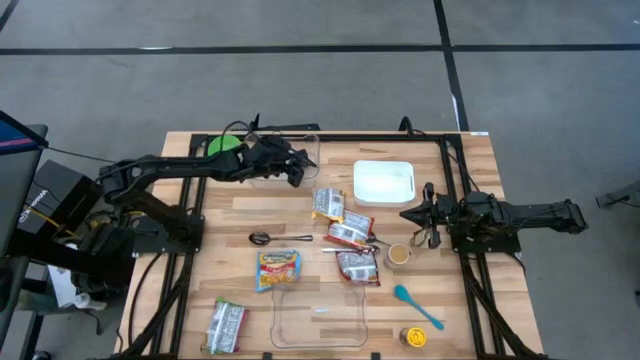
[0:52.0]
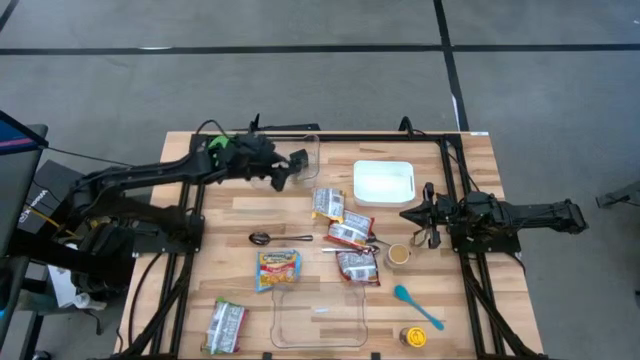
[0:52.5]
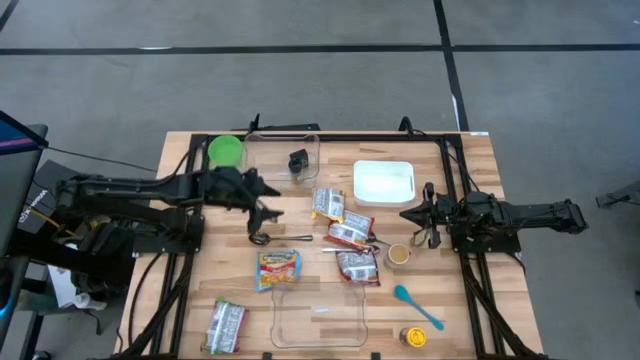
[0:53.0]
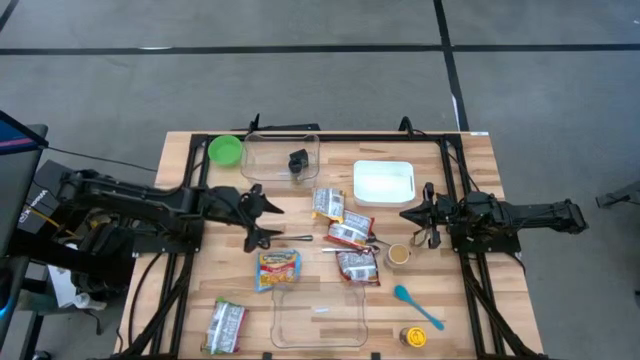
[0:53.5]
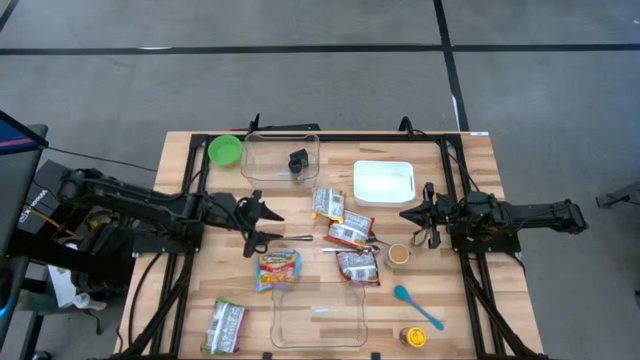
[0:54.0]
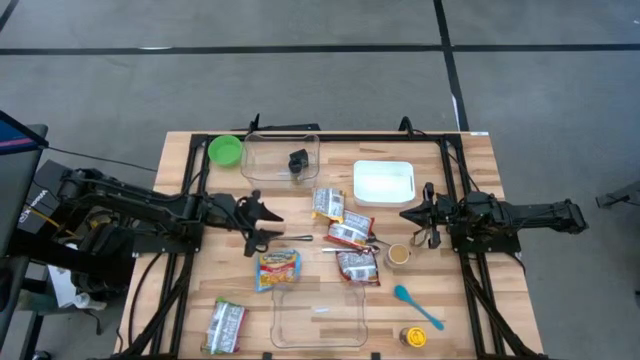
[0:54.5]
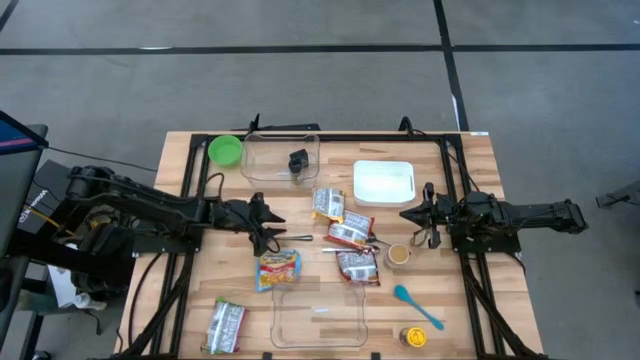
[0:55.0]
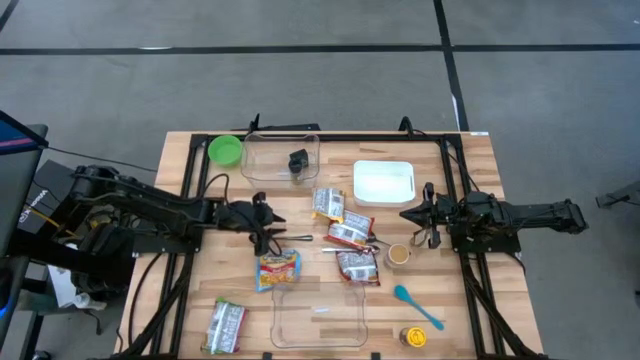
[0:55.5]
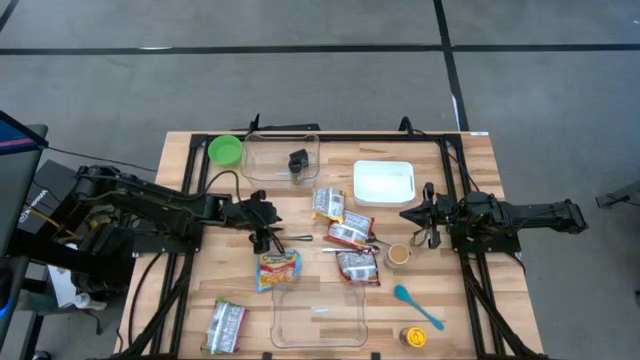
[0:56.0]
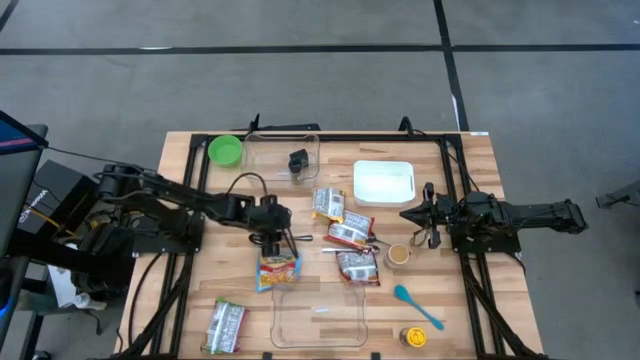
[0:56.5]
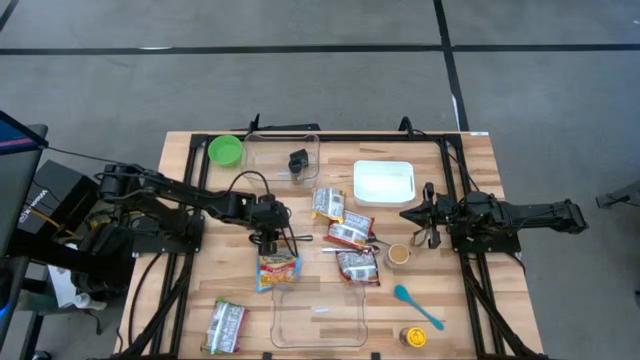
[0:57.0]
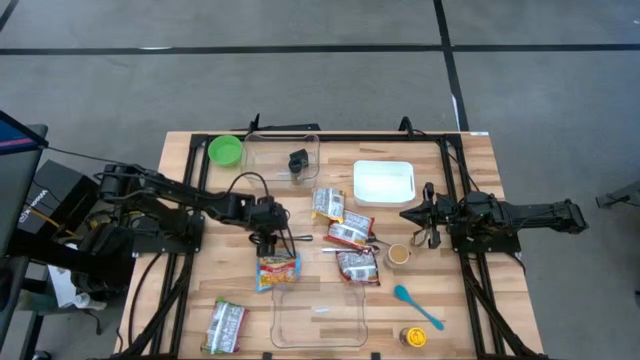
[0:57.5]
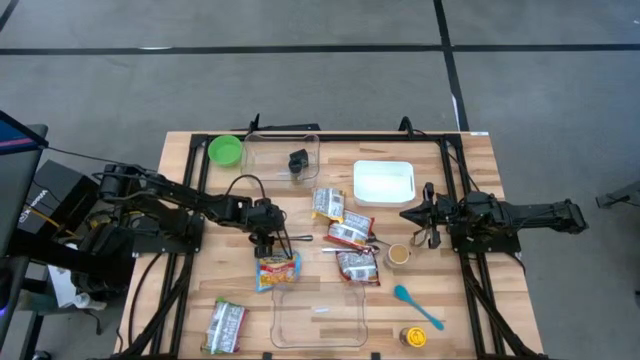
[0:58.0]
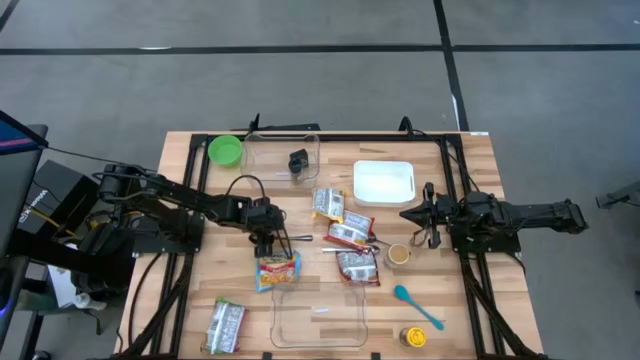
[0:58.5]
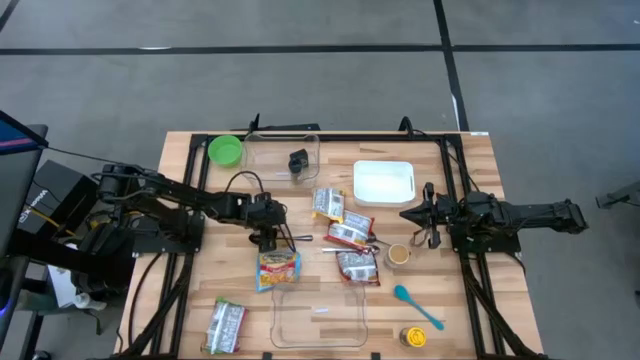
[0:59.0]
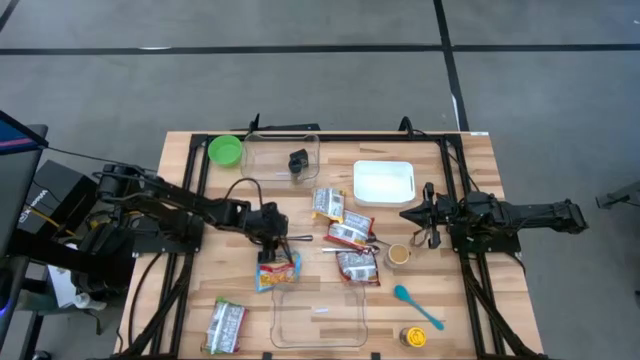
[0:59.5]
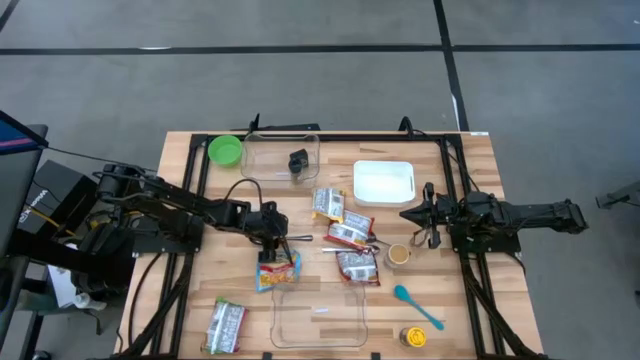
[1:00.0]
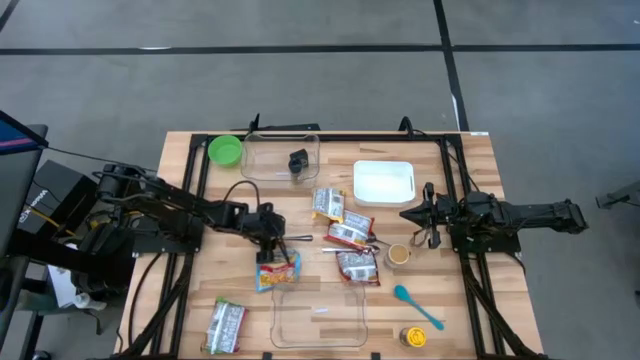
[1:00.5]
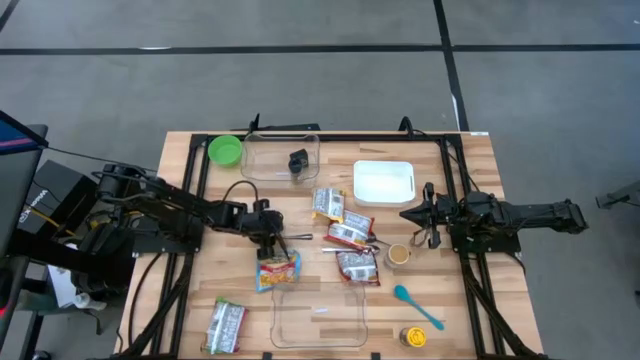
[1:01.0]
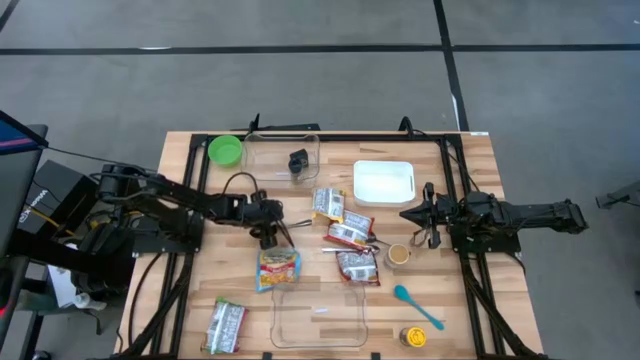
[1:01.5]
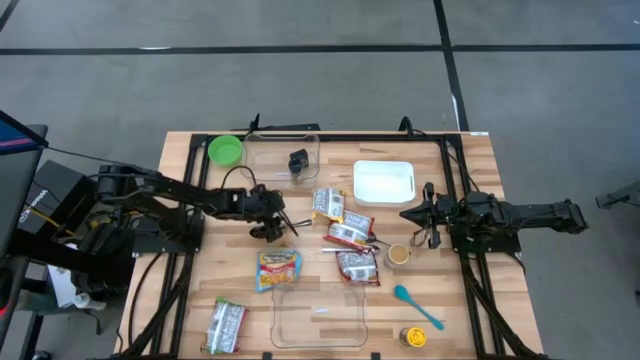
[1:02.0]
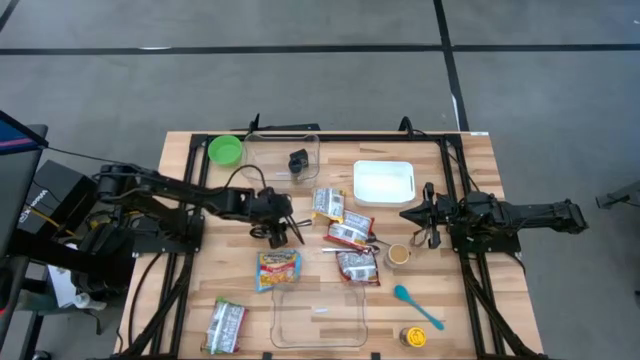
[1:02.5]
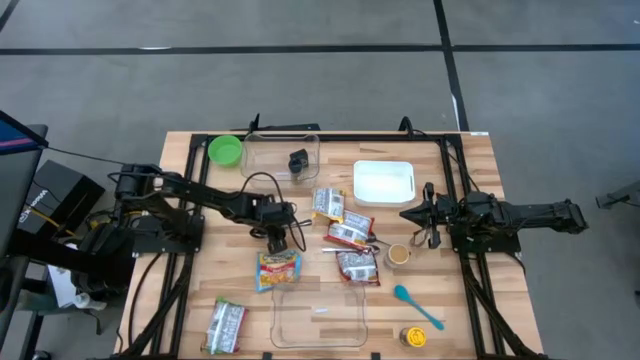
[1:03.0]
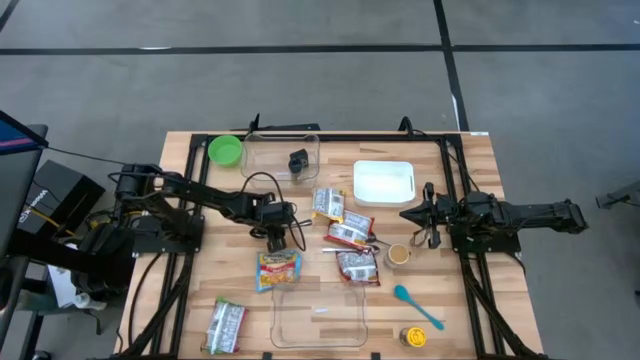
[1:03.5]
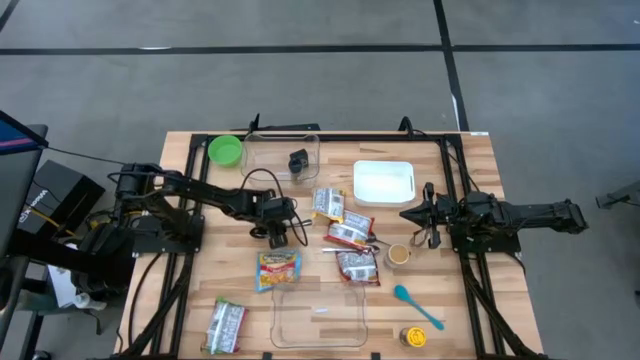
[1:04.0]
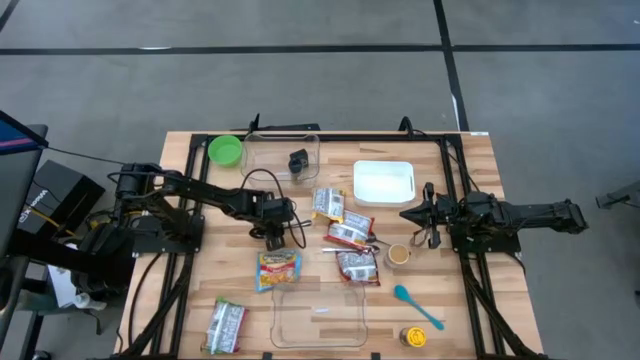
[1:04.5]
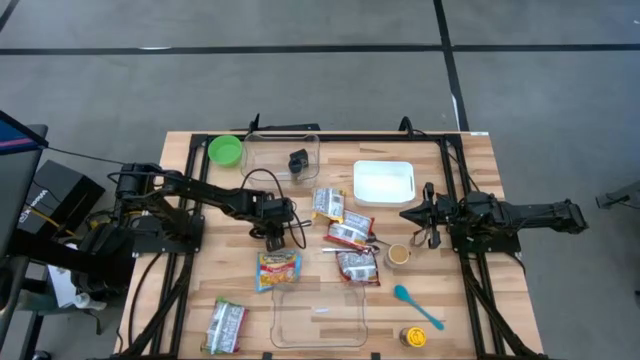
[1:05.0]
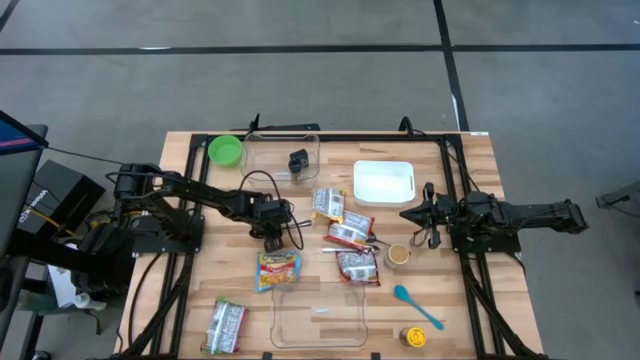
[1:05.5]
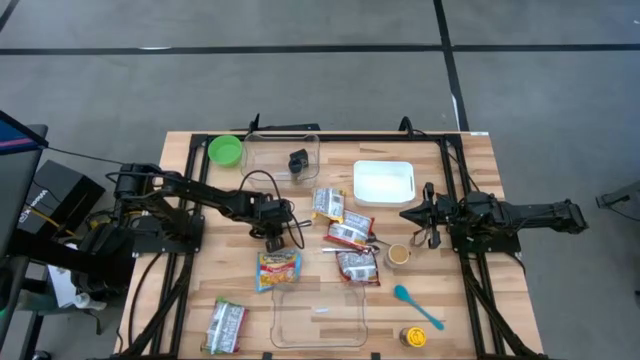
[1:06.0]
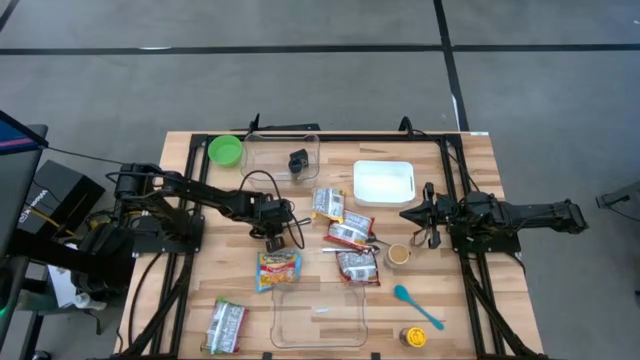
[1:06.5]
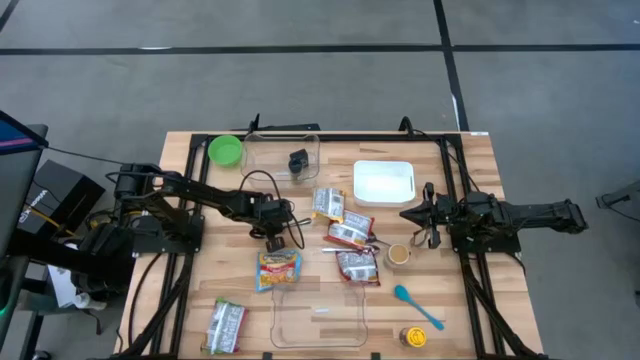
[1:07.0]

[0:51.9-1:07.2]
Task: Pick & Place Food Item
Put the left black spoon into the white bin

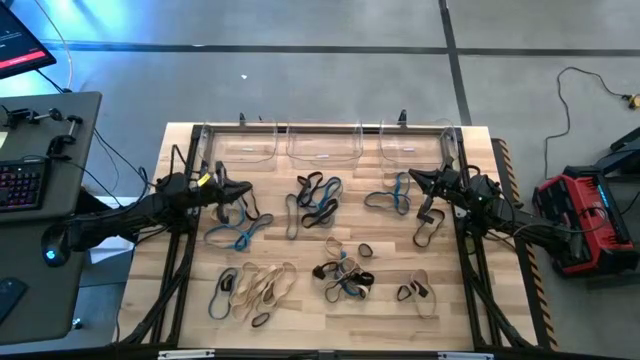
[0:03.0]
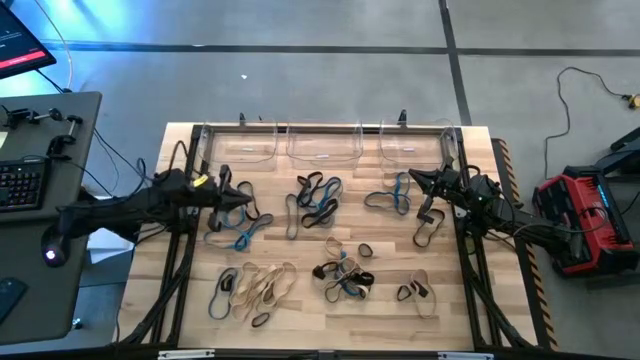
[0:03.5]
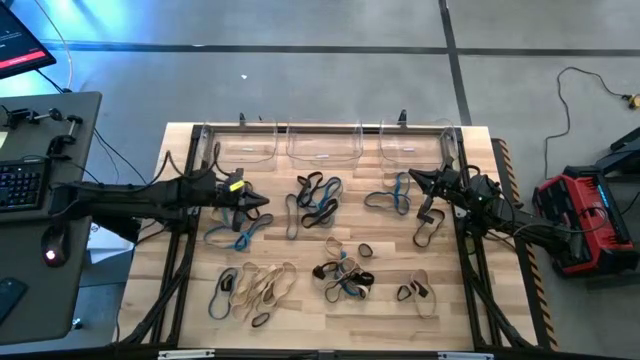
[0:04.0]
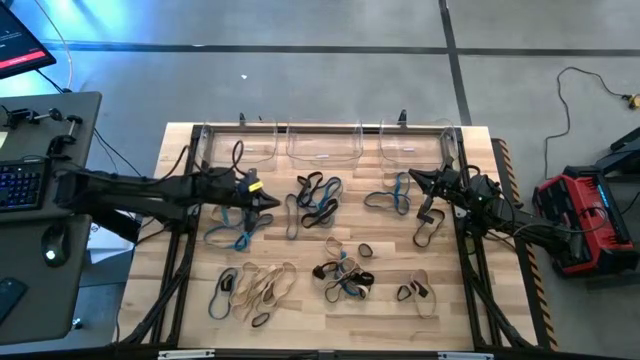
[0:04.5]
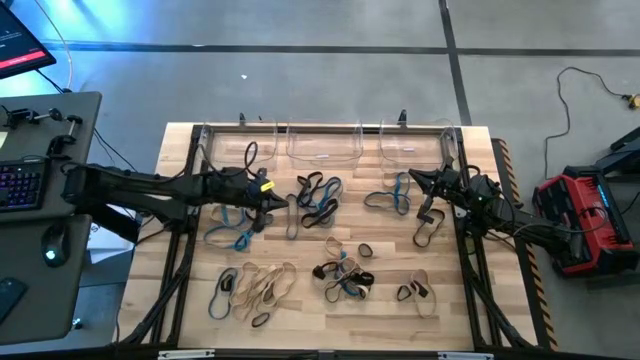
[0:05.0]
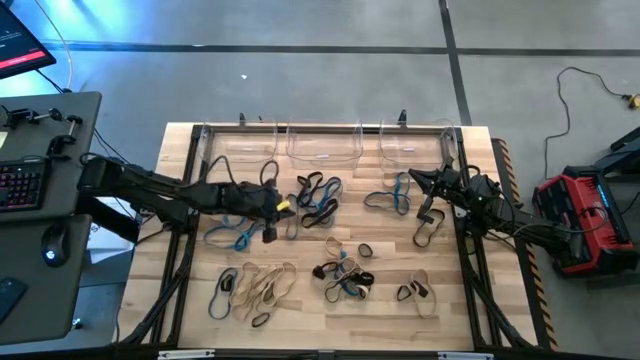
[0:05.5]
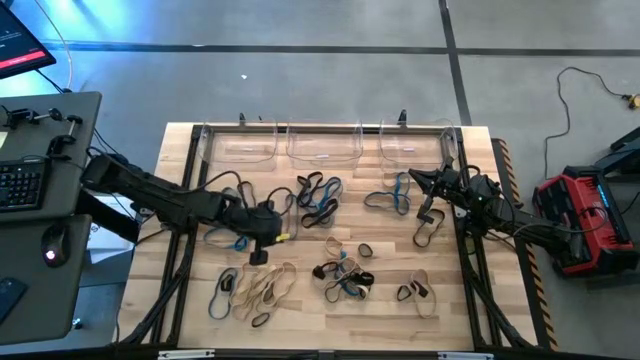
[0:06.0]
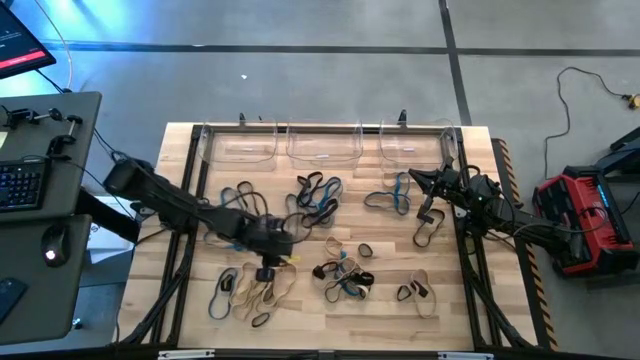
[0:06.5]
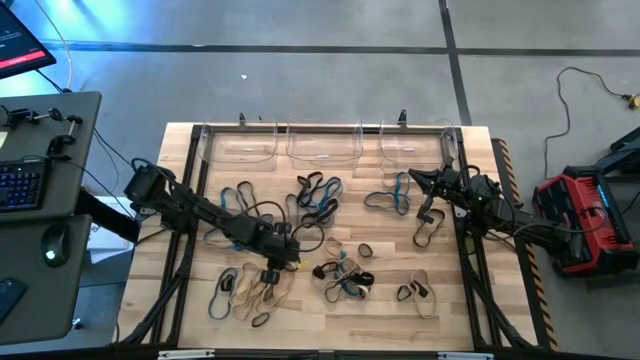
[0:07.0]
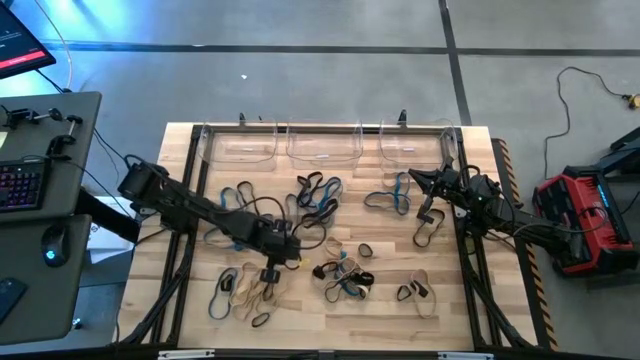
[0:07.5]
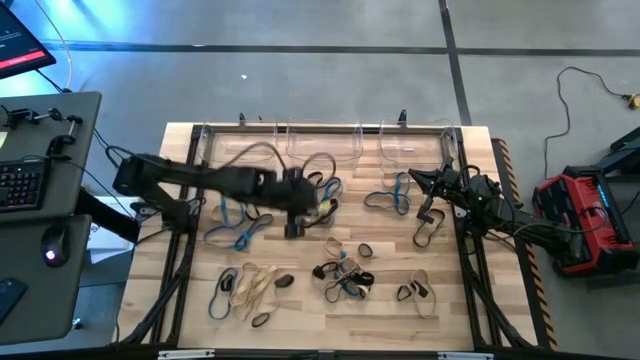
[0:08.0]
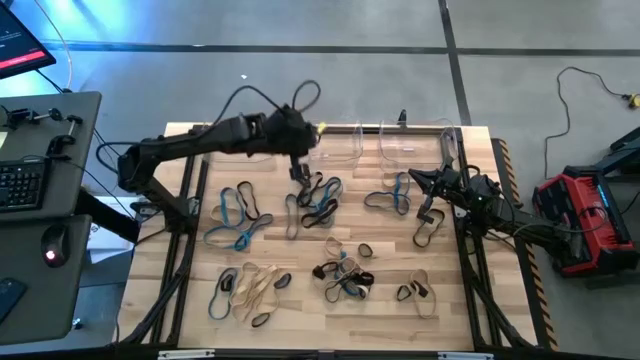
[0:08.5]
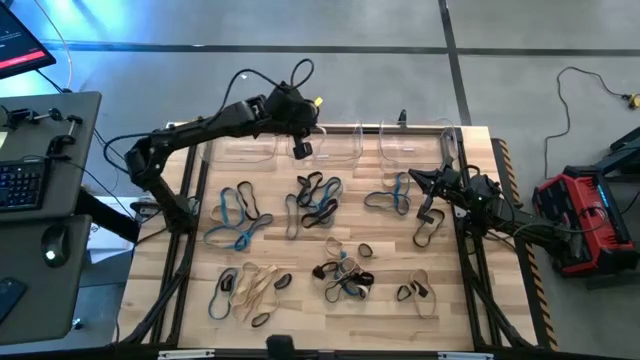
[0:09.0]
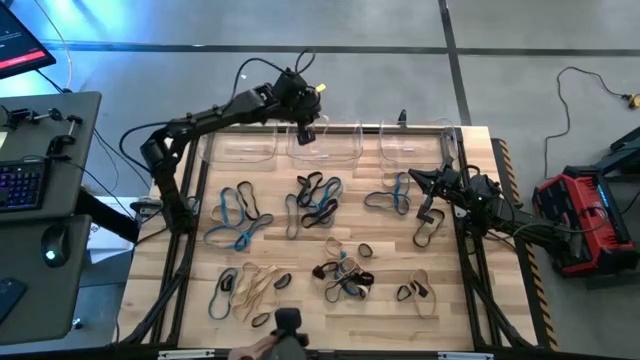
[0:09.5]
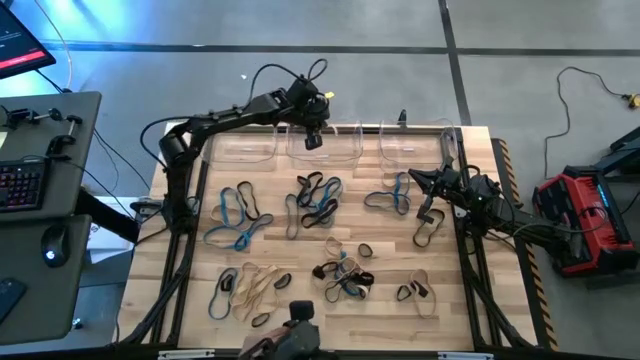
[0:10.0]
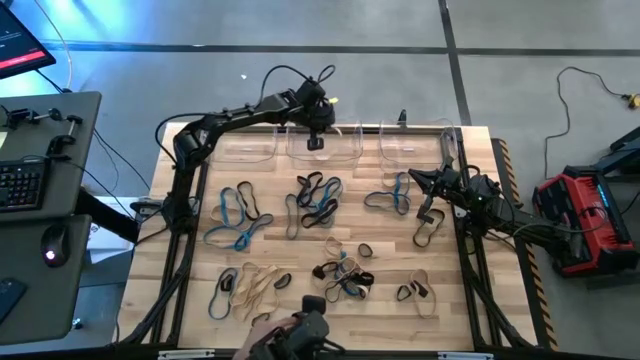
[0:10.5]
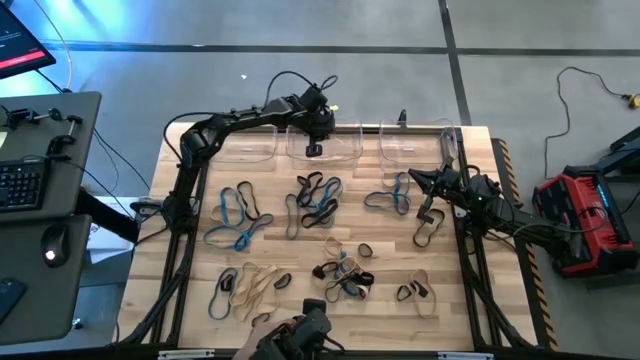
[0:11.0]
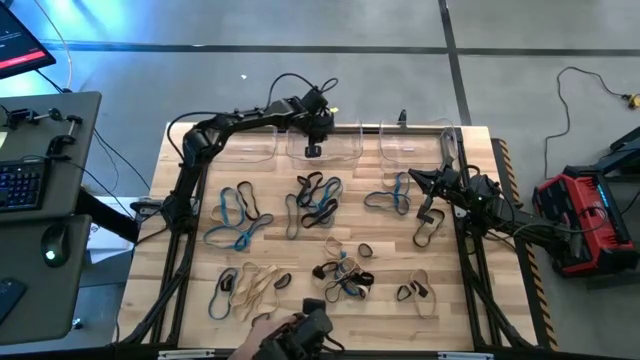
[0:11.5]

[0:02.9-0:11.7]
Task: Sort rubber bands into baskets
Put the brown rubber band into the middle transparent bin
